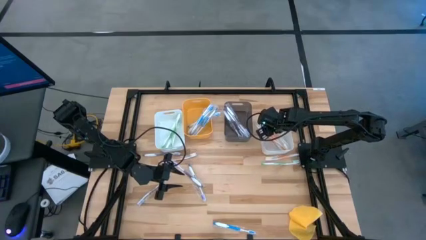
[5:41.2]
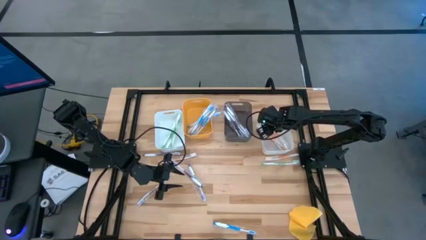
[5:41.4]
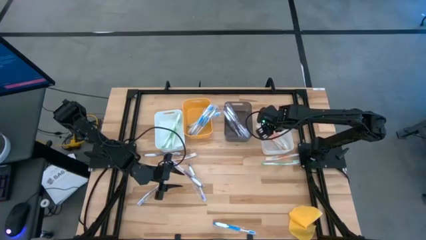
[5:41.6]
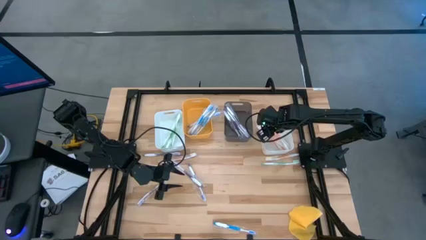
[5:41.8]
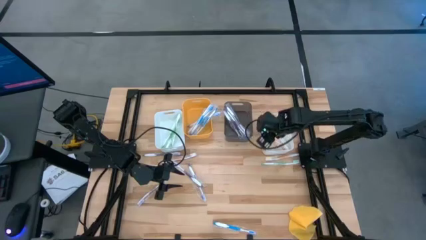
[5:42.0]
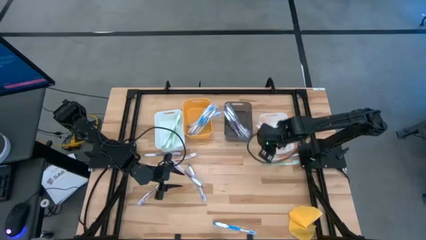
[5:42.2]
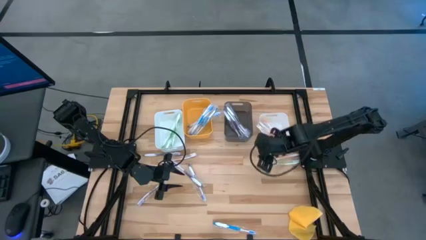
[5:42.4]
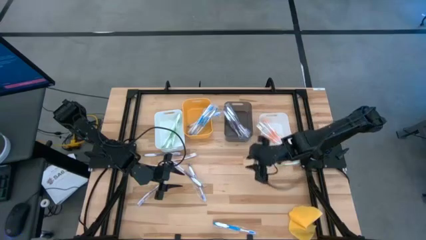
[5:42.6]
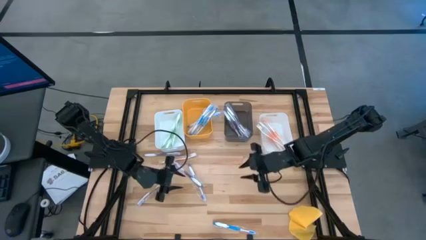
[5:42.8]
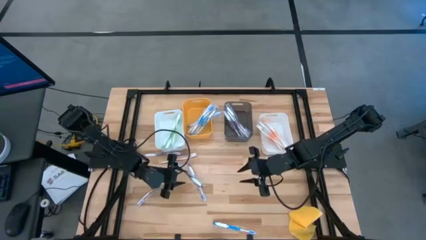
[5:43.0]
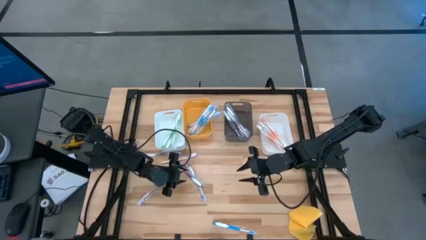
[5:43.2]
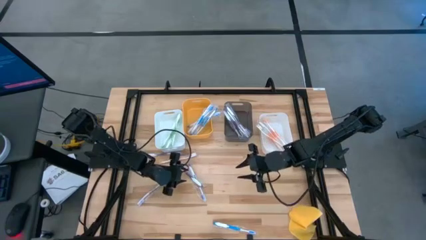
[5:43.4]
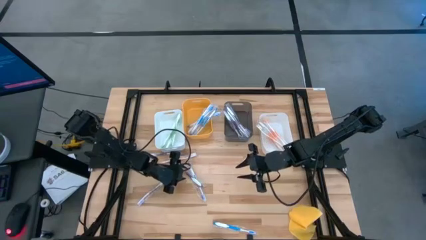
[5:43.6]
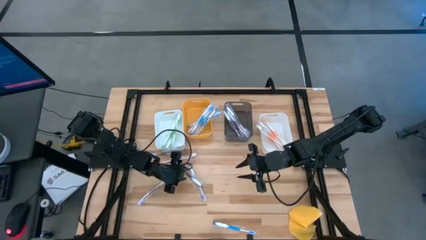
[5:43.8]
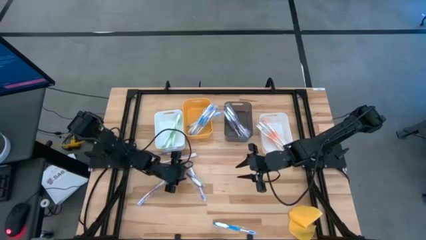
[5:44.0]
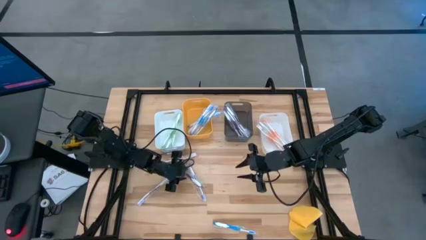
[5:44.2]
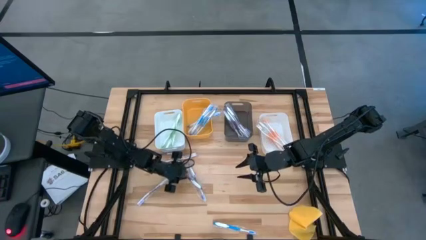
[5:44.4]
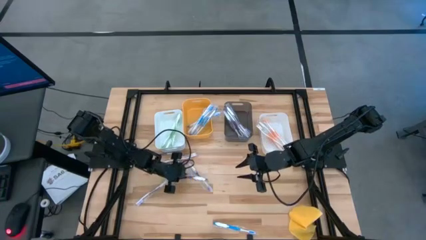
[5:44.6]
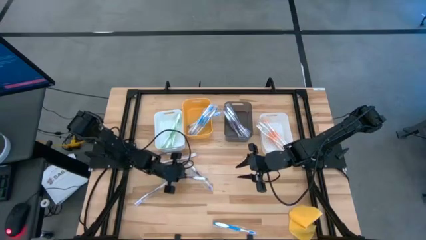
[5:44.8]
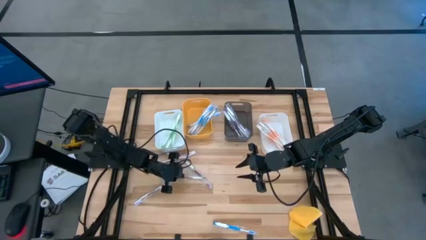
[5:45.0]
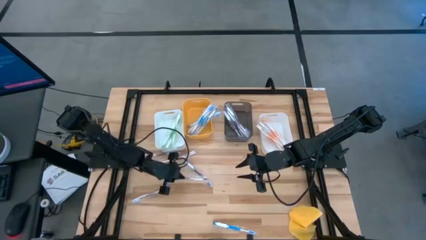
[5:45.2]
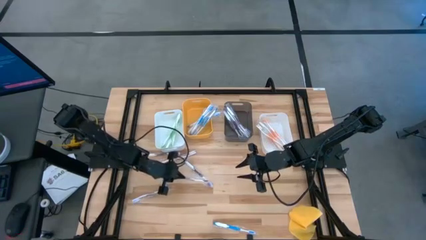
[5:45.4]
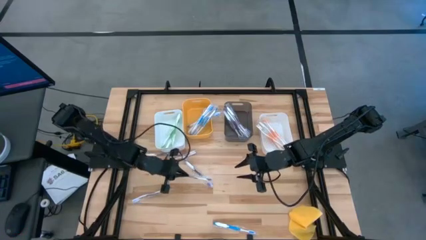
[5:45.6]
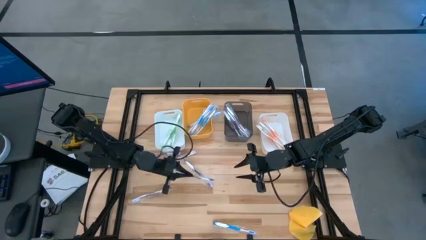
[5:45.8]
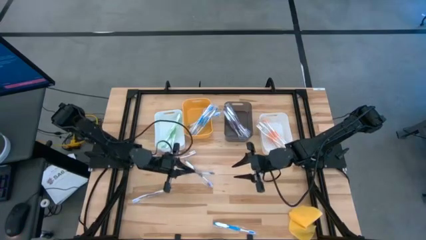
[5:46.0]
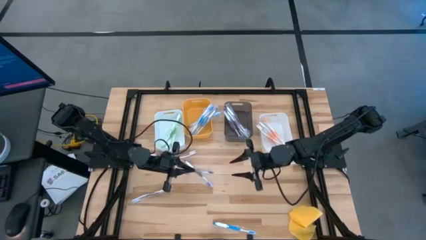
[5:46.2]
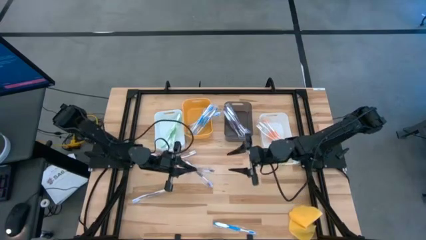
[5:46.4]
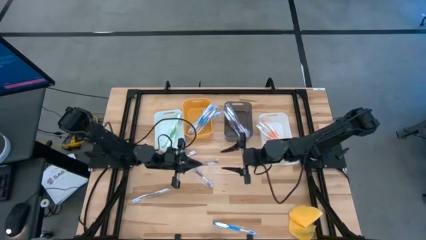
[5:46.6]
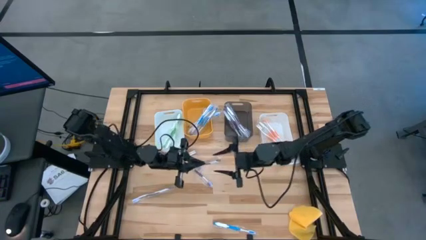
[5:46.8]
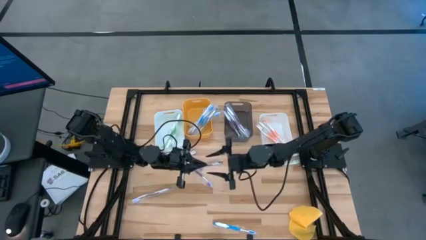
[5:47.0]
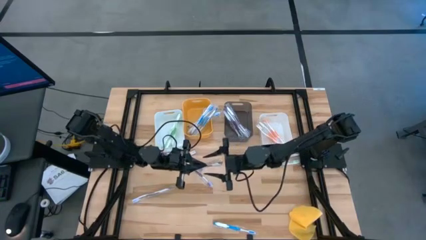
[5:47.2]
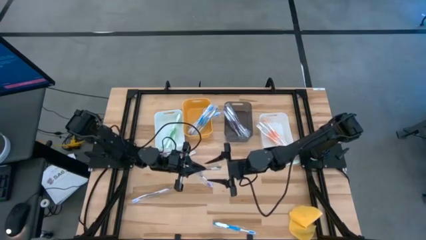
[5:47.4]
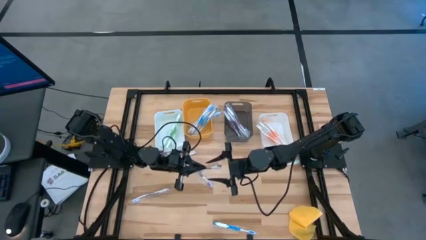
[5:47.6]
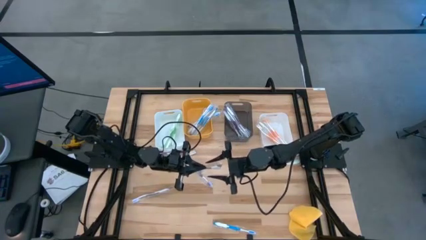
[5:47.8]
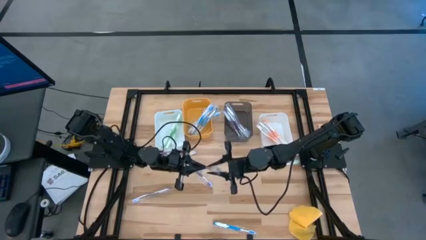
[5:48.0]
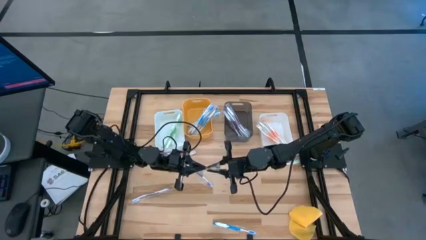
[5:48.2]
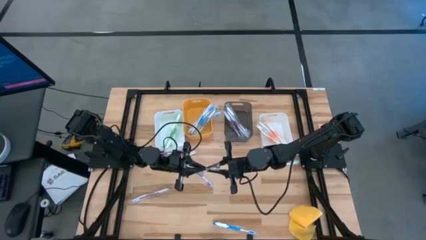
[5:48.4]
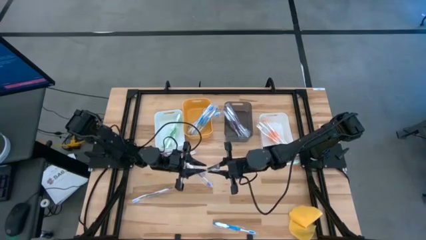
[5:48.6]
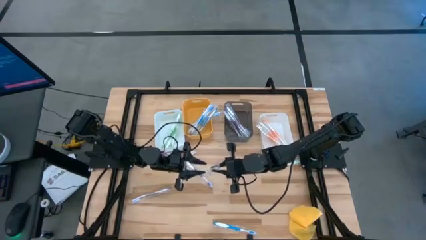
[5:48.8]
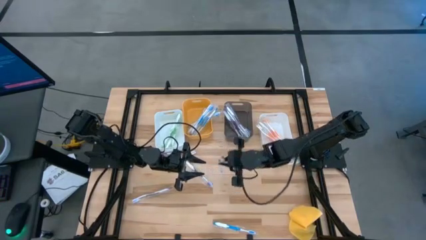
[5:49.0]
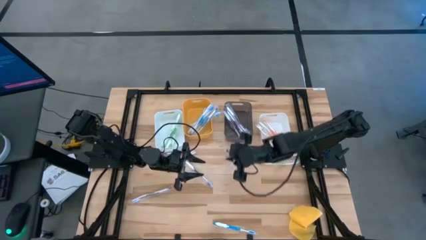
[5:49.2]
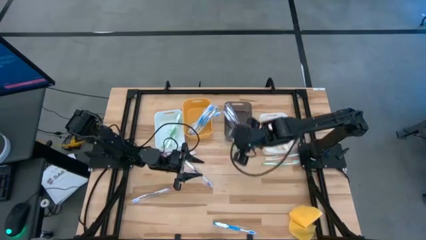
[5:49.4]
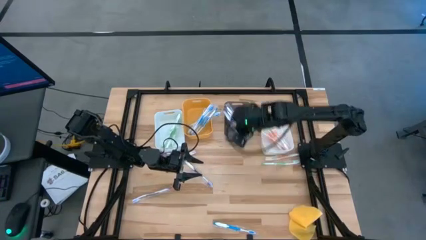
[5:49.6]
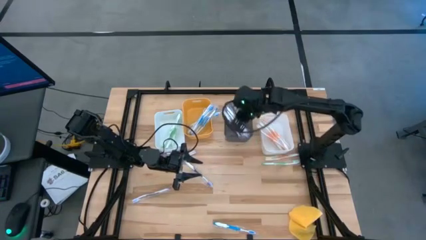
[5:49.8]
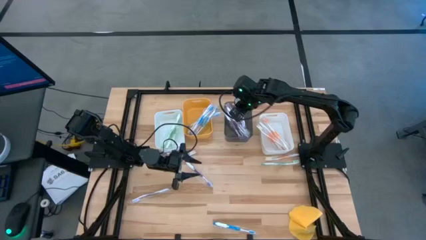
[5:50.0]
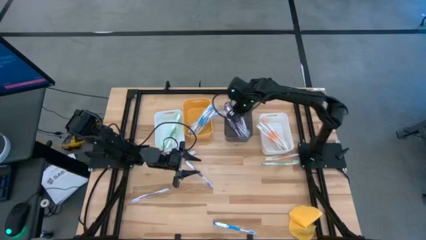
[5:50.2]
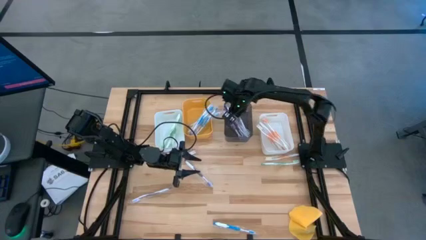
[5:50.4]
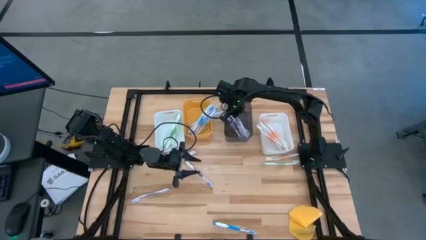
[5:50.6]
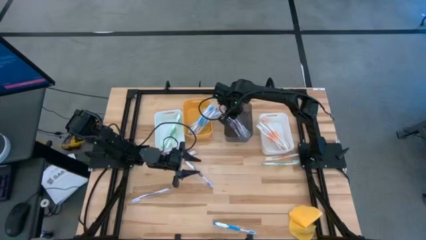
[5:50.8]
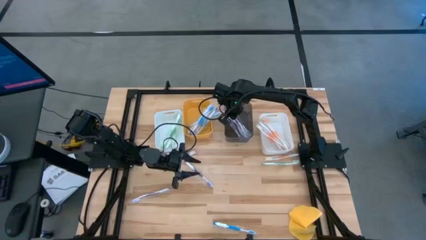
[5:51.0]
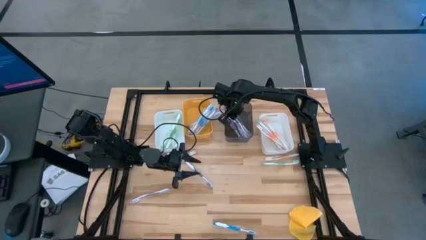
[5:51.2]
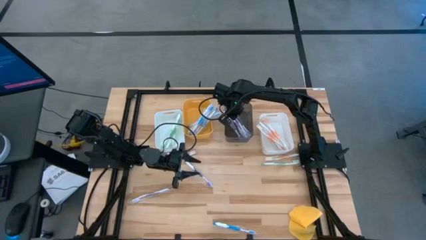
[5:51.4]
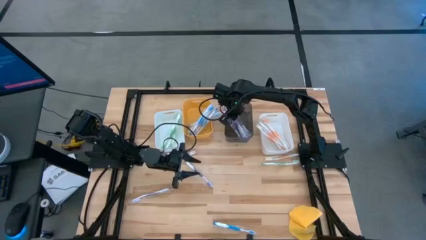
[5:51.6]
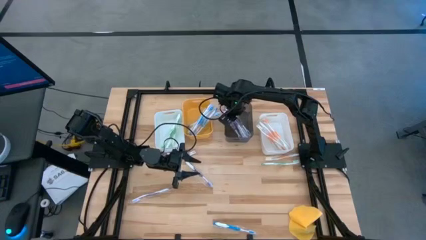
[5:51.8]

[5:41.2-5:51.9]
Task: Pick & Place Toothbrushes
Put the purple toothbrush into the black transparent bin

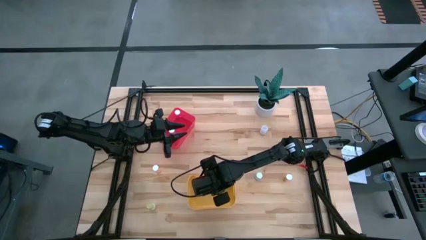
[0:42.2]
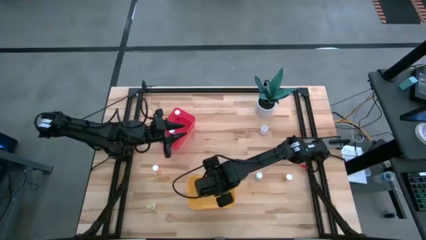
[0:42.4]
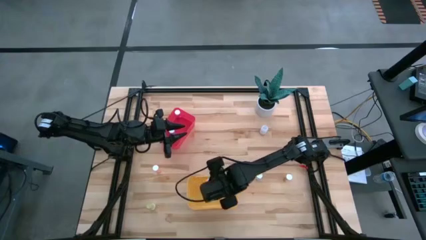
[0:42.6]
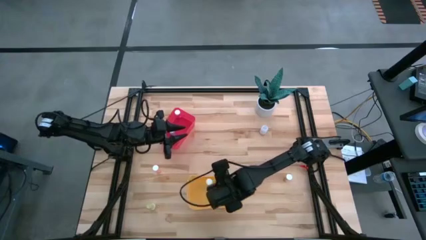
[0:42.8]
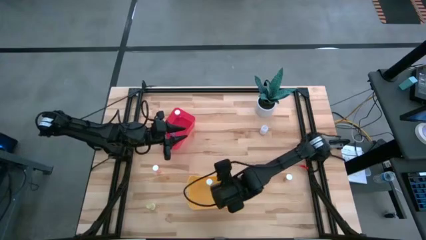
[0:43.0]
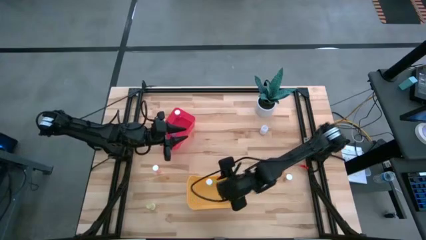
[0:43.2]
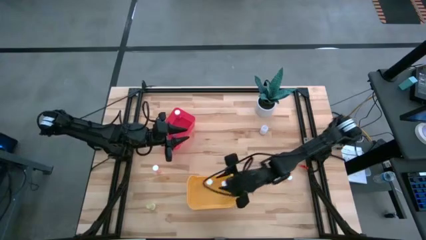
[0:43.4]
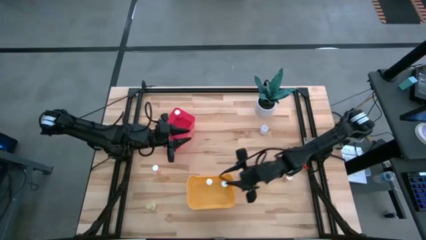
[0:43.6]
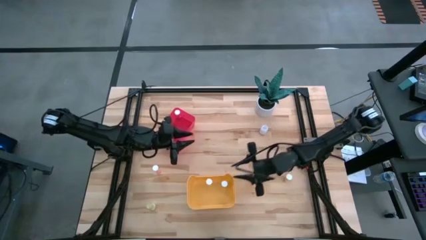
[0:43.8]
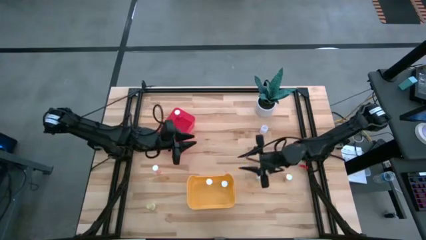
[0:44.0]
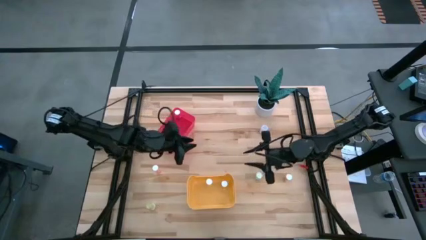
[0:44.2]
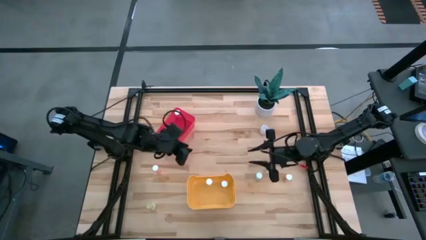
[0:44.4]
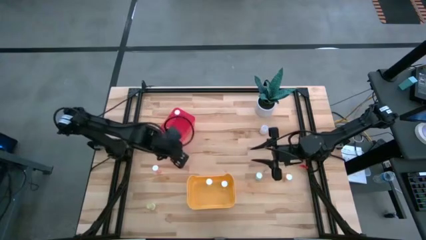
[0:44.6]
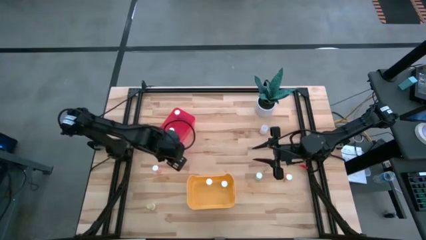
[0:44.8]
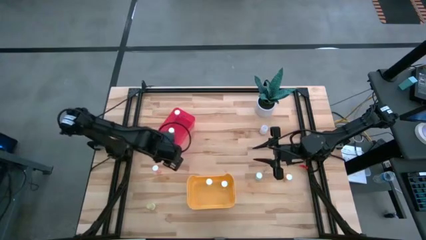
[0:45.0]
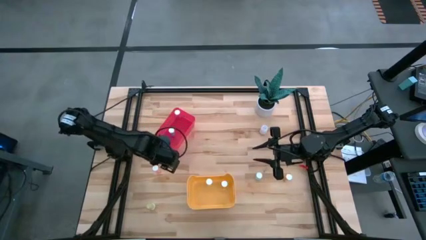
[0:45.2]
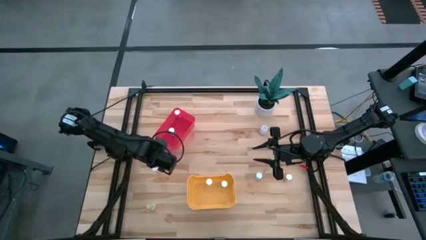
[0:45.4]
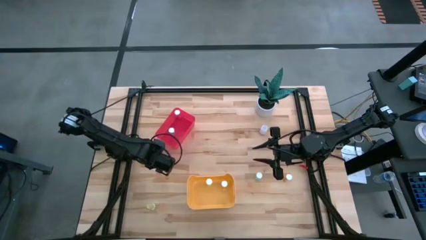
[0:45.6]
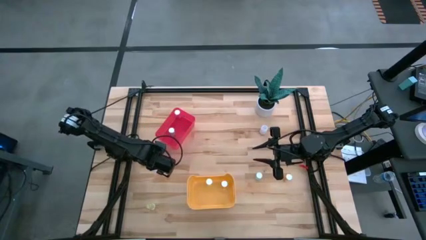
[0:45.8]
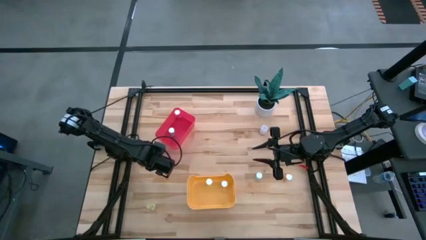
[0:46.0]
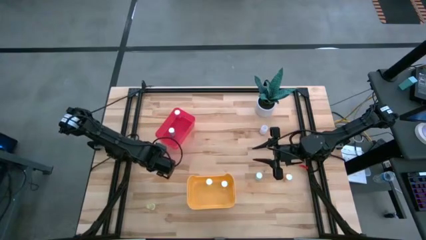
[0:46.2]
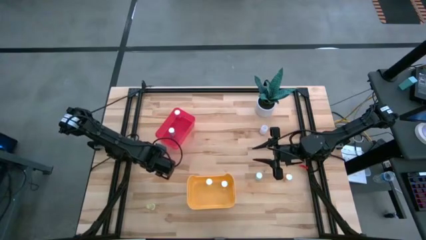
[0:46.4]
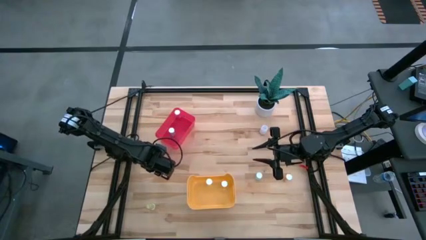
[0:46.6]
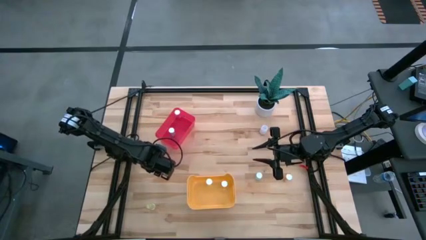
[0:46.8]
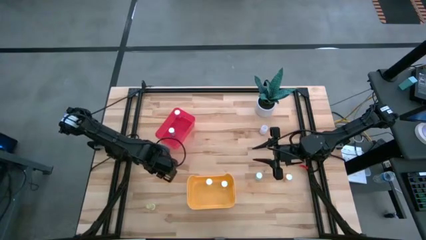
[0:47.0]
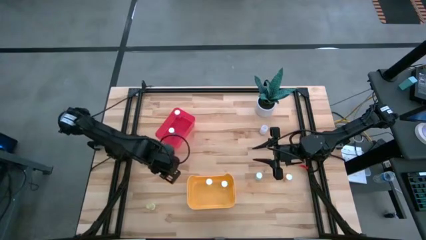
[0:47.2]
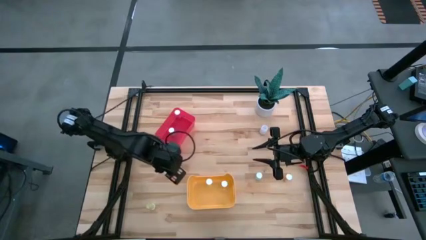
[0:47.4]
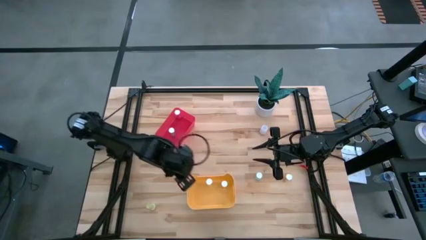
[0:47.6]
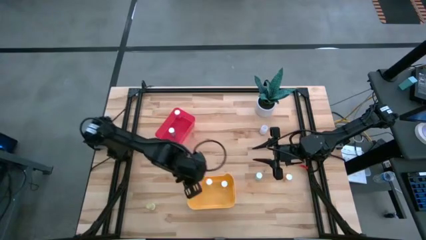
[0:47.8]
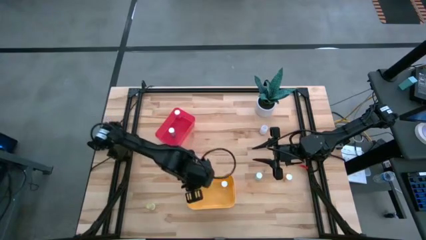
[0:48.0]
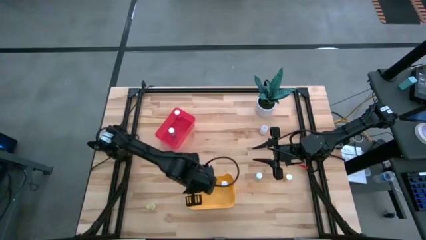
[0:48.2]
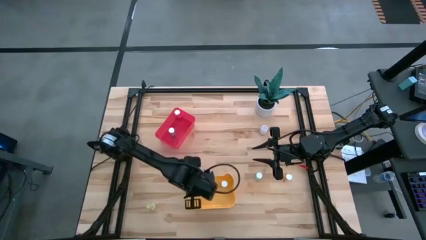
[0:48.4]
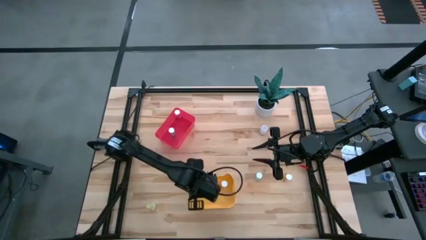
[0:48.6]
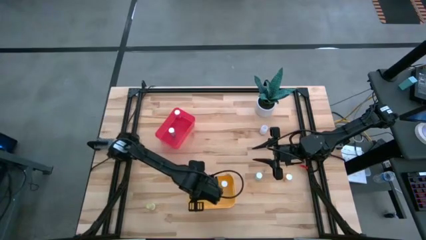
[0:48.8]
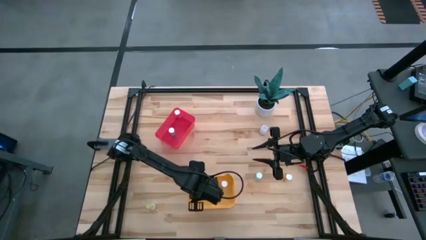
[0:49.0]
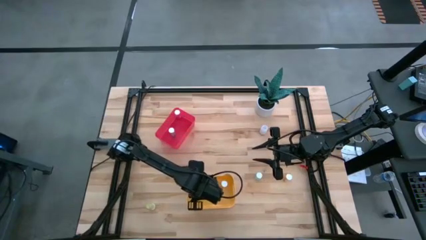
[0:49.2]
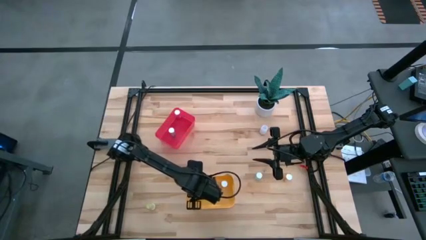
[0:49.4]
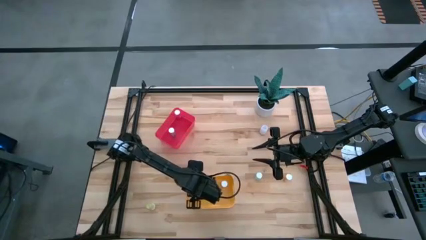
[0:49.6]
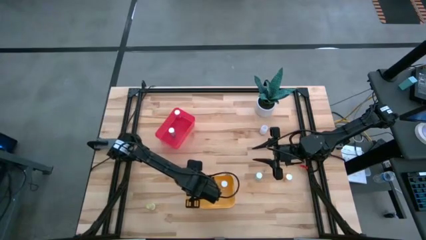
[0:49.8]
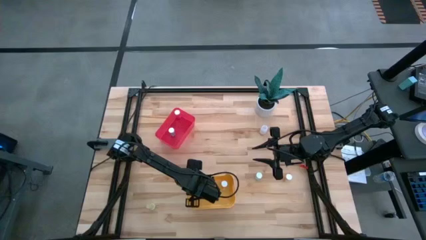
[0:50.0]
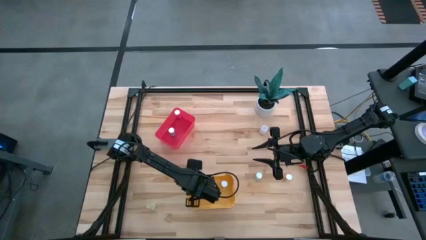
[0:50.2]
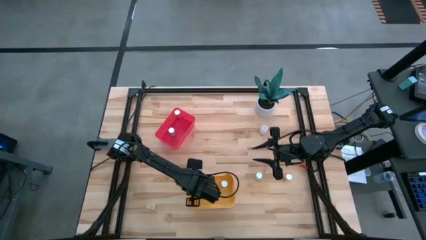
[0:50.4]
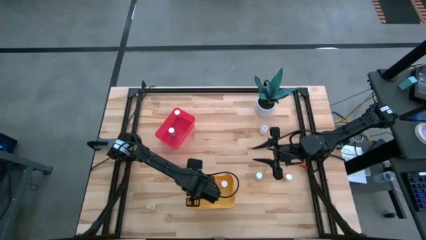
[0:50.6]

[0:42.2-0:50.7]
Task: Pick and place medicine bottles into bin by pill shape (circle, oval)
Put the pink tablet bottle into the yellow bin
